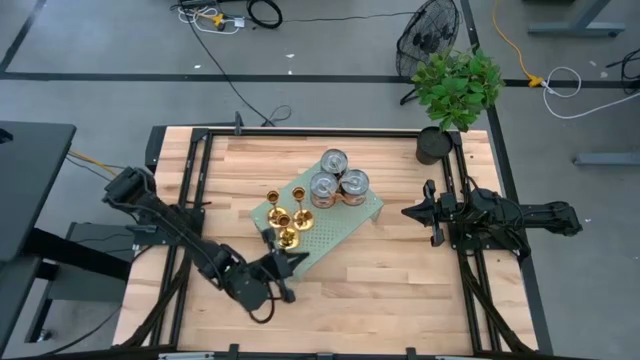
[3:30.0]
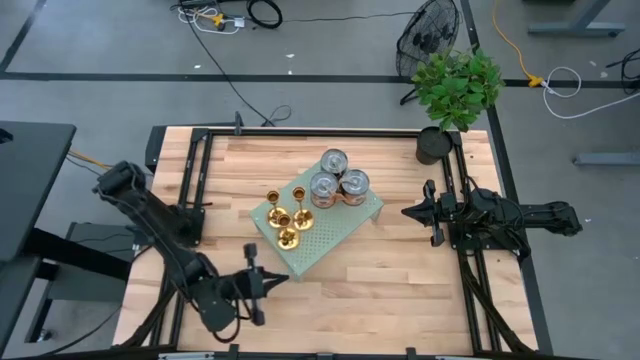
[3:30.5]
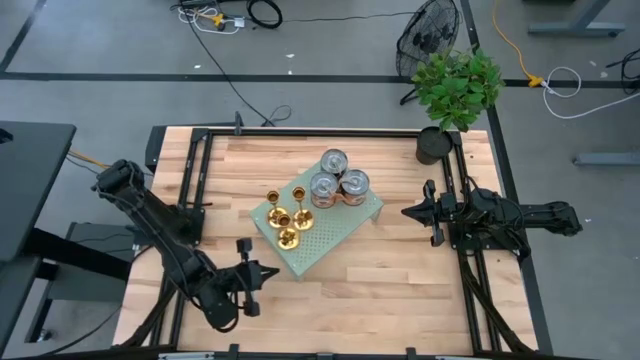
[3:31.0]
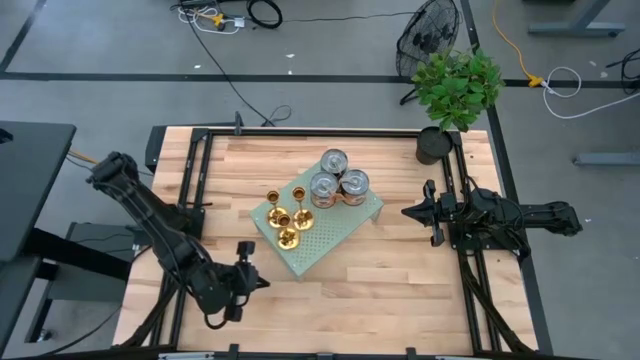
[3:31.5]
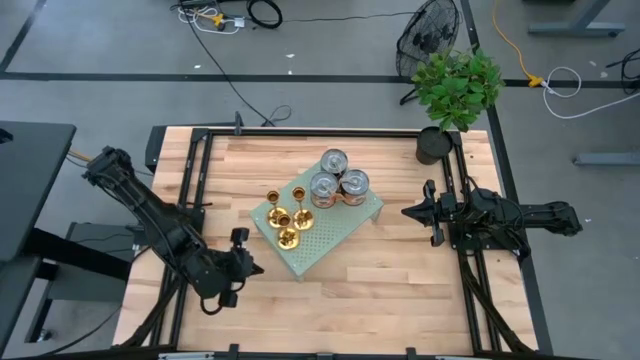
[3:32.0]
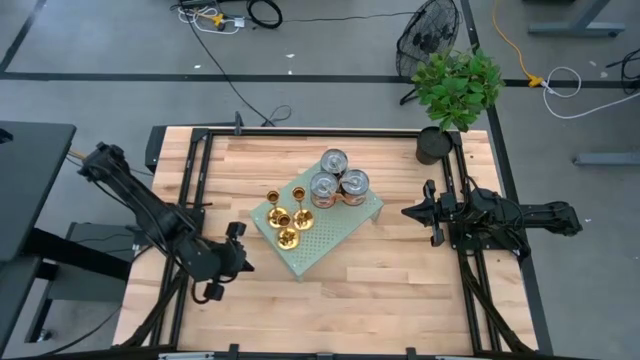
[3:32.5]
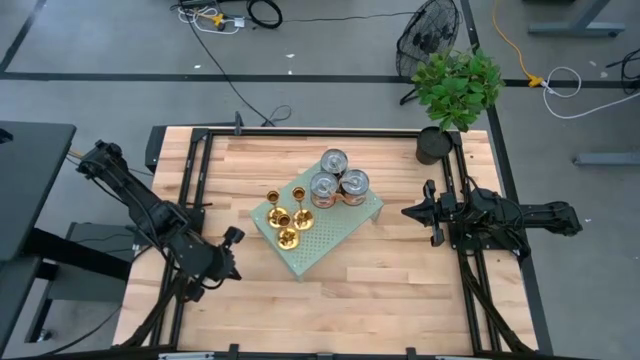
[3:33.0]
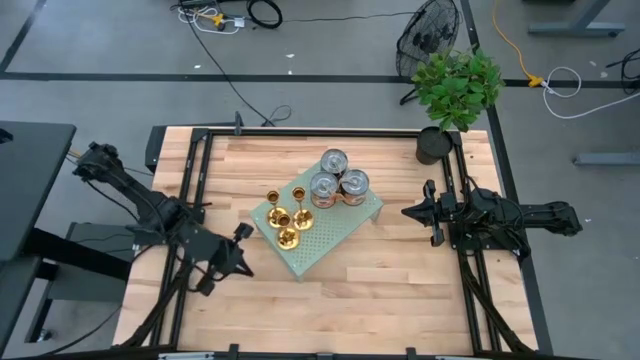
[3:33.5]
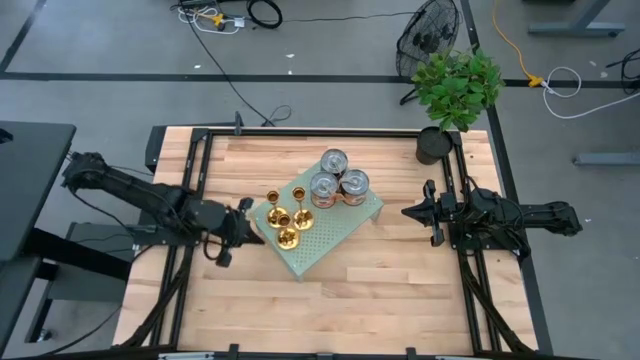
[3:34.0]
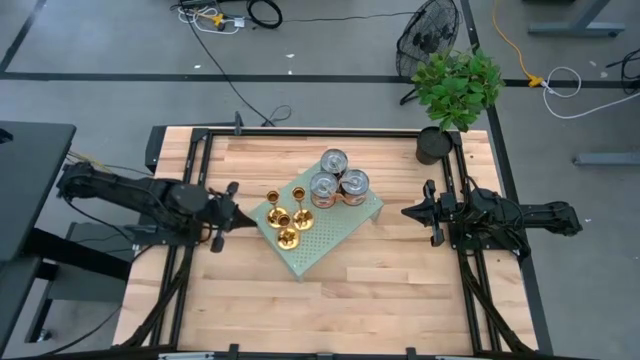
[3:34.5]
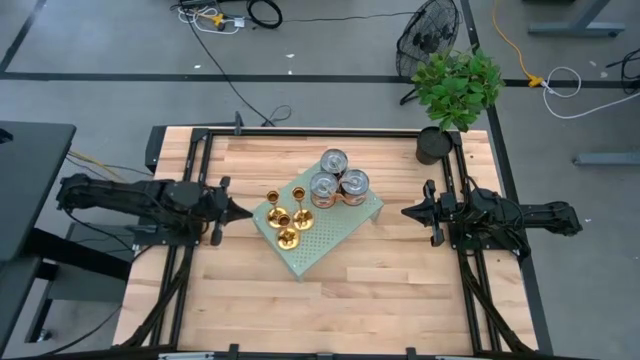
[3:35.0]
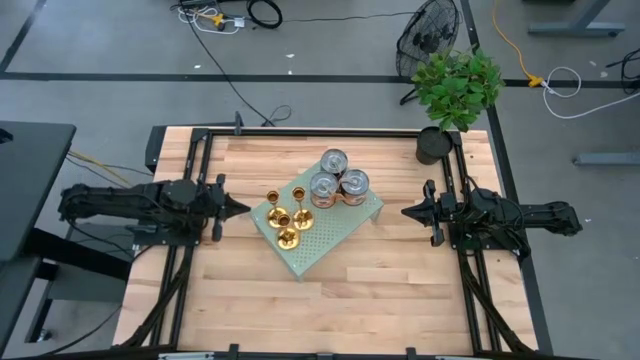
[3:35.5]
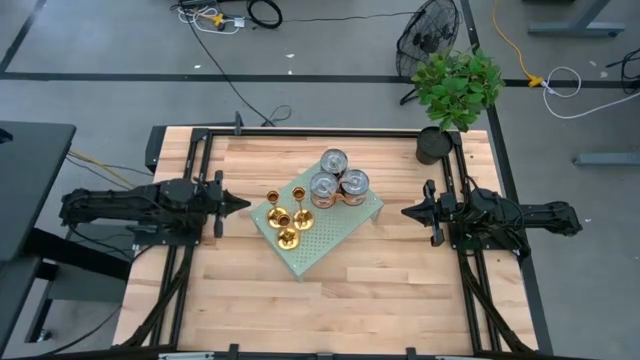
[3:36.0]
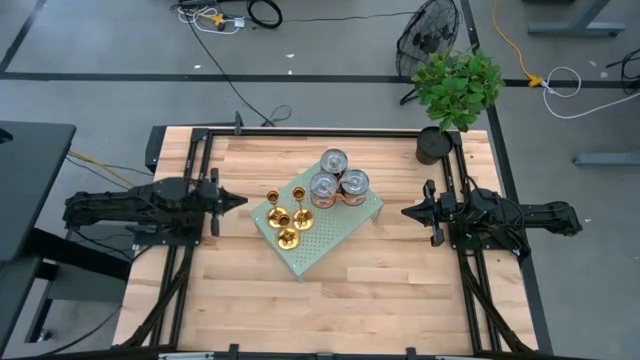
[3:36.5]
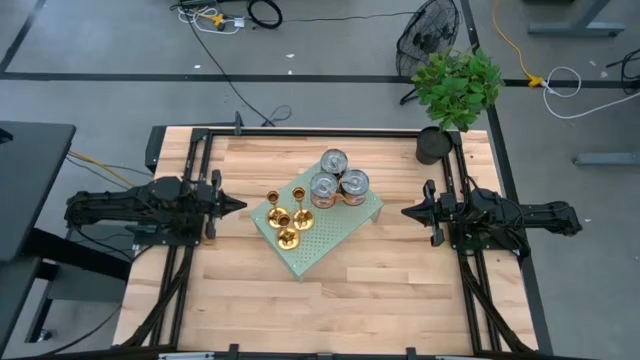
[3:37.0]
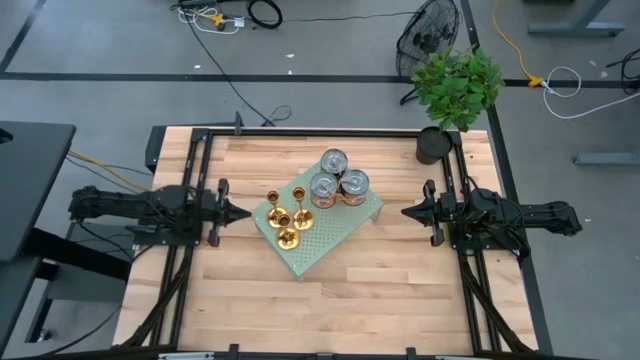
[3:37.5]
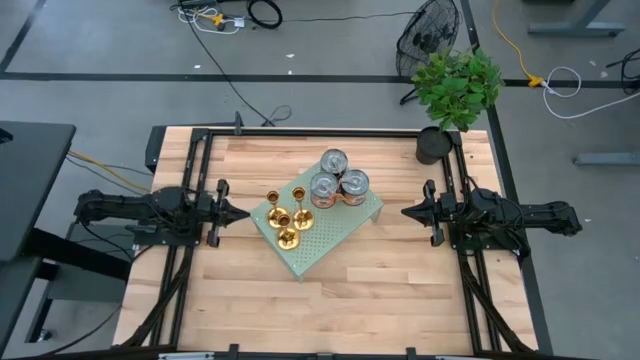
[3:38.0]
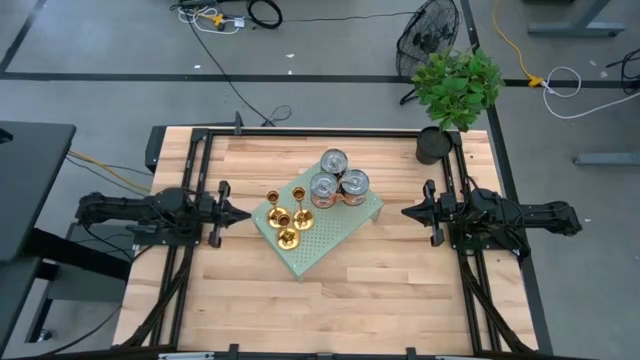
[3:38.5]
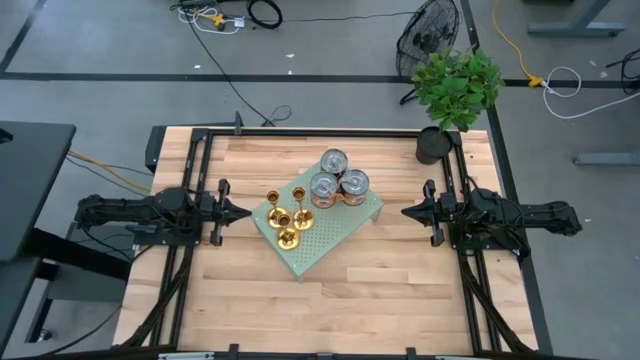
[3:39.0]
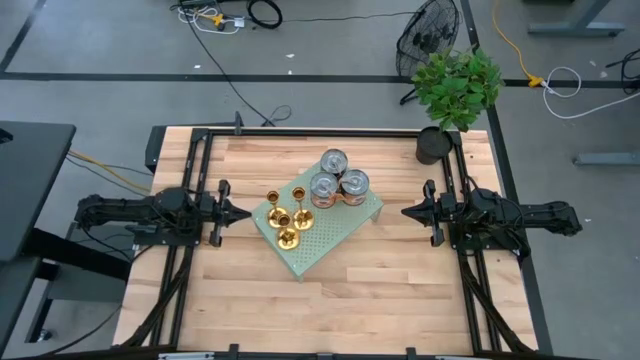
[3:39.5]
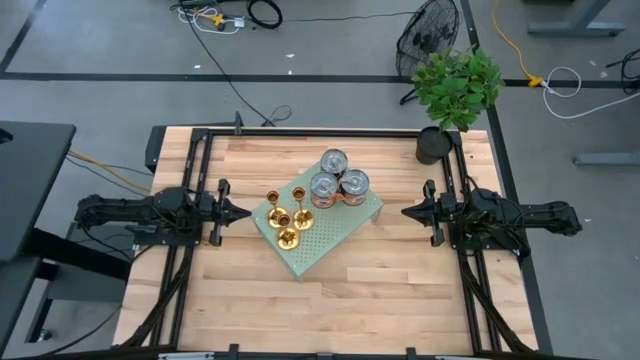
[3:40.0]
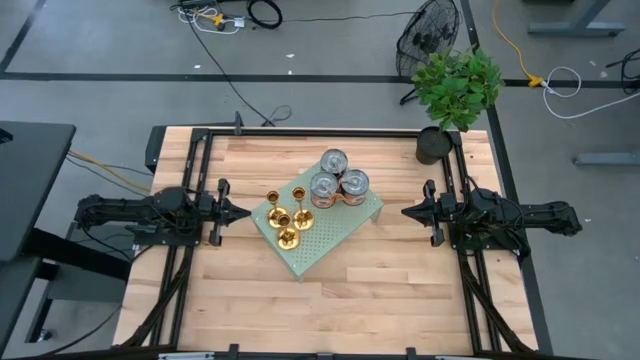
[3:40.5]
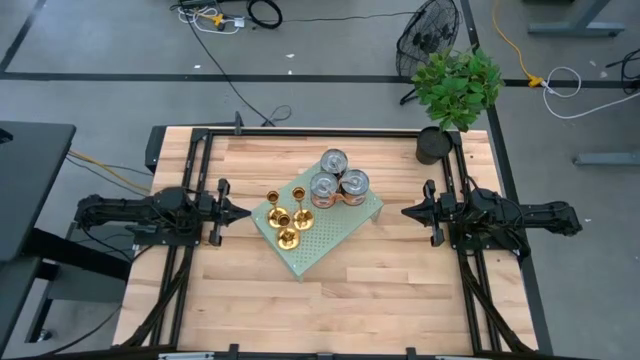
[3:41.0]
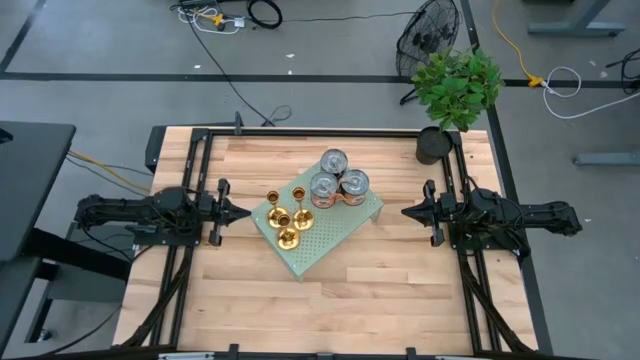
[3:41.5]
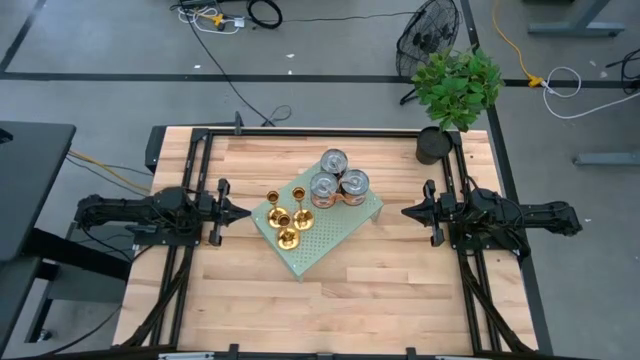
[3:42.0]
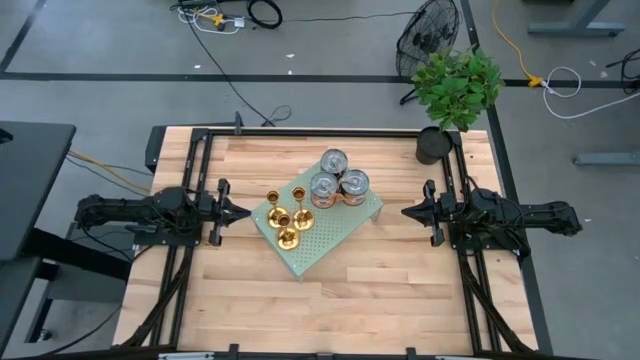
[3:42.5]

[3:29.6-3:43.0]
Task: Pick & Place candle stick holders
Return to Home Position

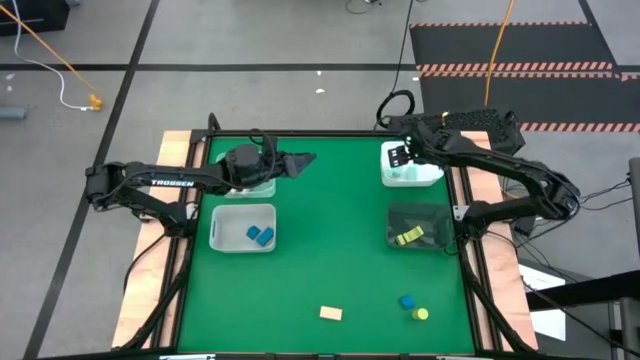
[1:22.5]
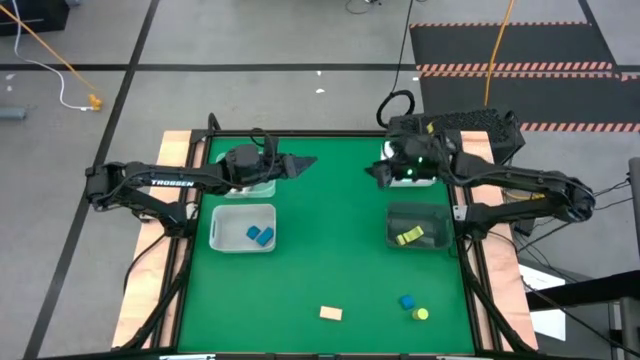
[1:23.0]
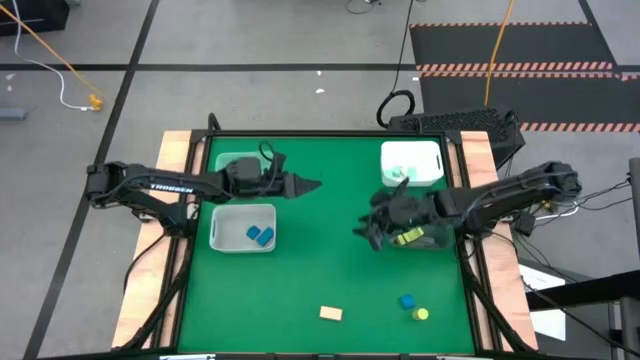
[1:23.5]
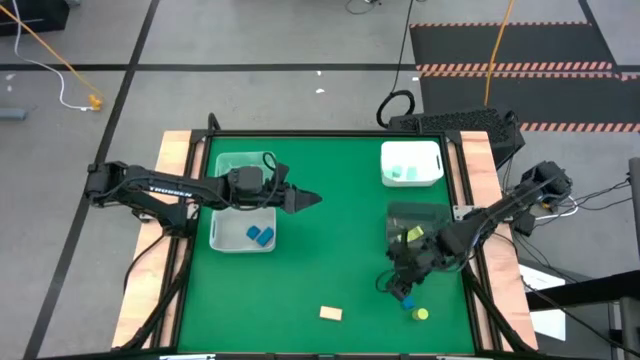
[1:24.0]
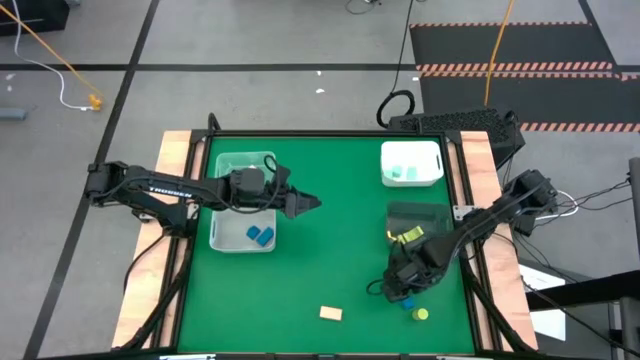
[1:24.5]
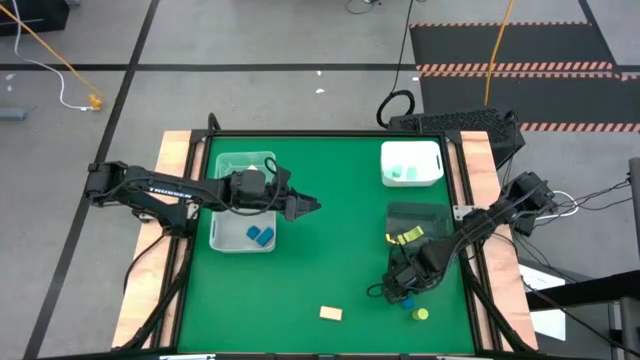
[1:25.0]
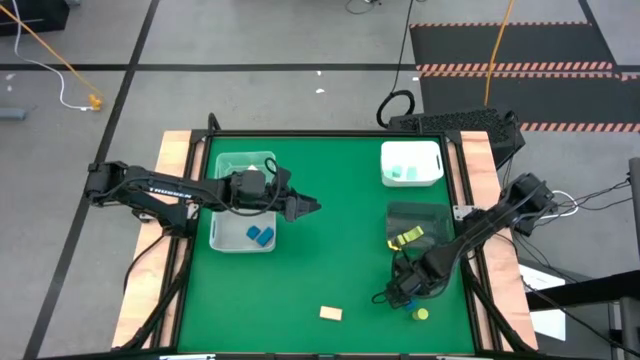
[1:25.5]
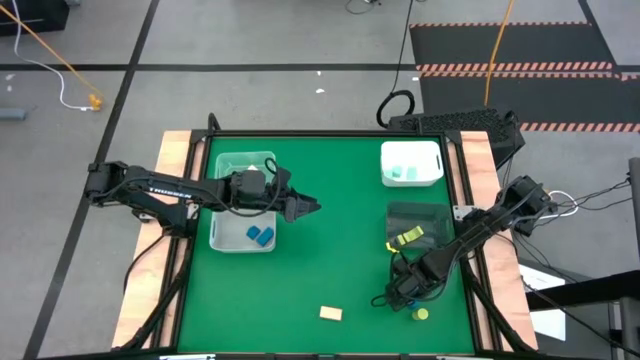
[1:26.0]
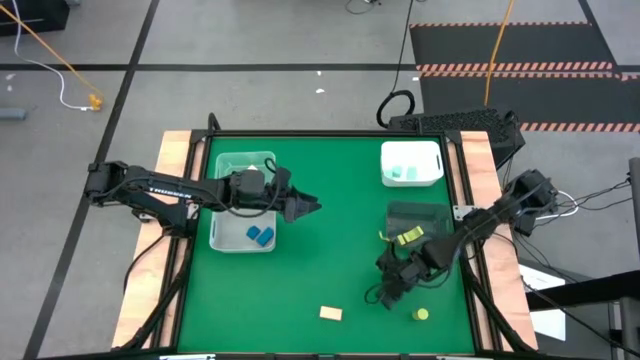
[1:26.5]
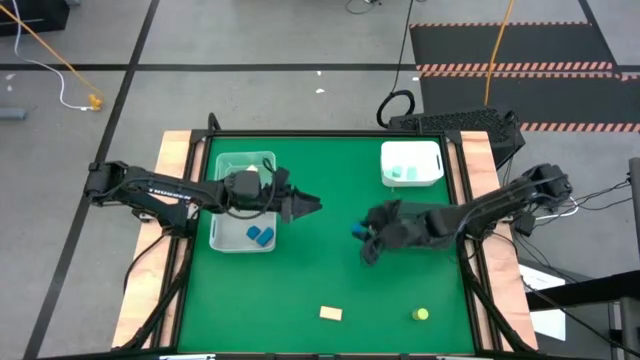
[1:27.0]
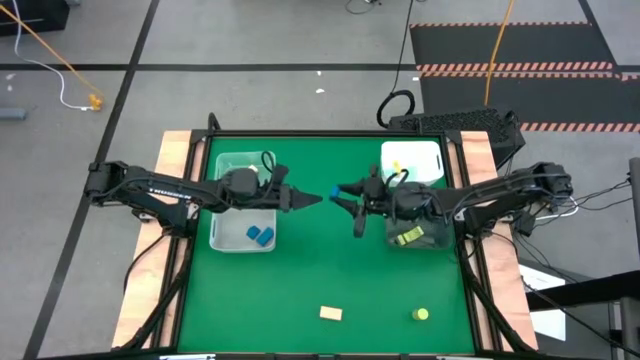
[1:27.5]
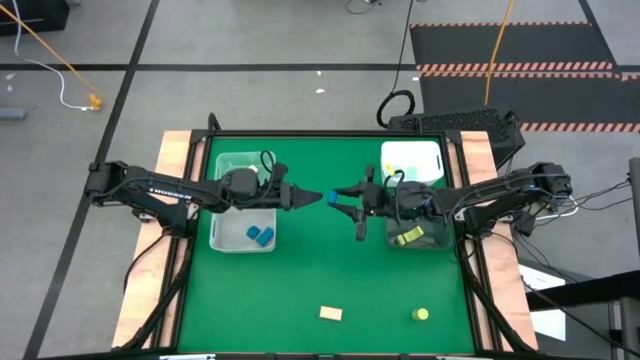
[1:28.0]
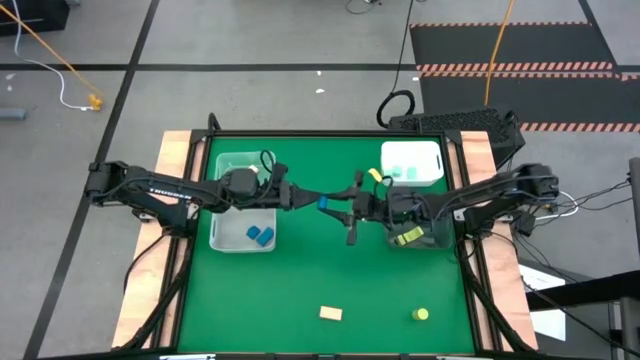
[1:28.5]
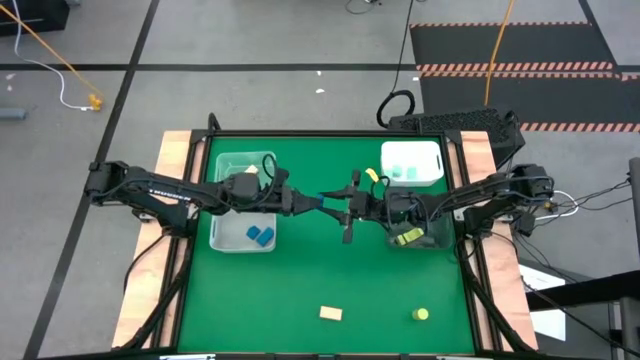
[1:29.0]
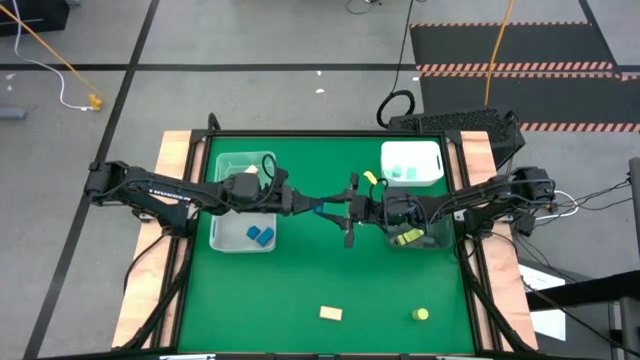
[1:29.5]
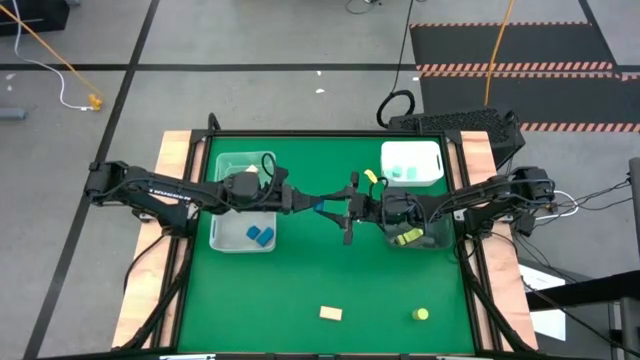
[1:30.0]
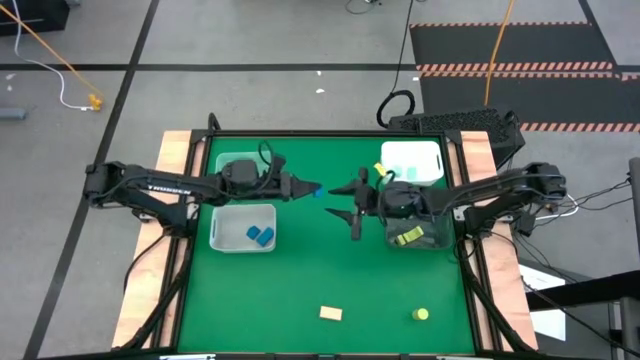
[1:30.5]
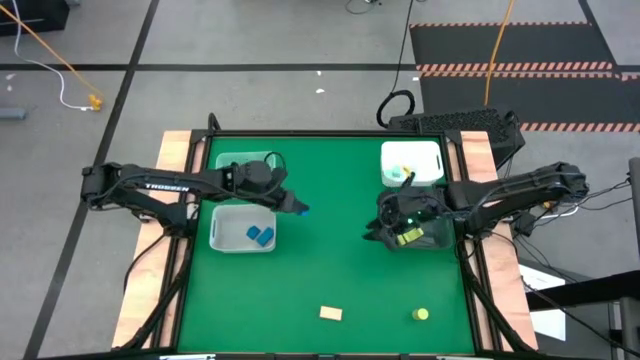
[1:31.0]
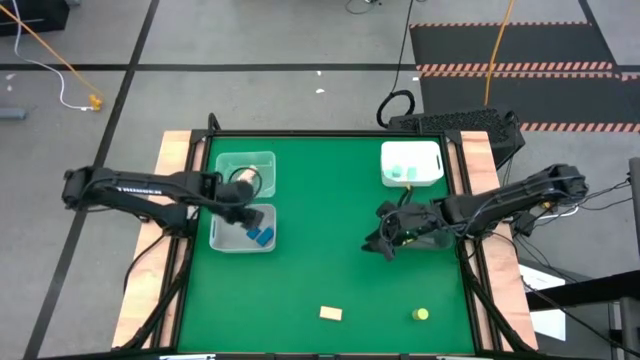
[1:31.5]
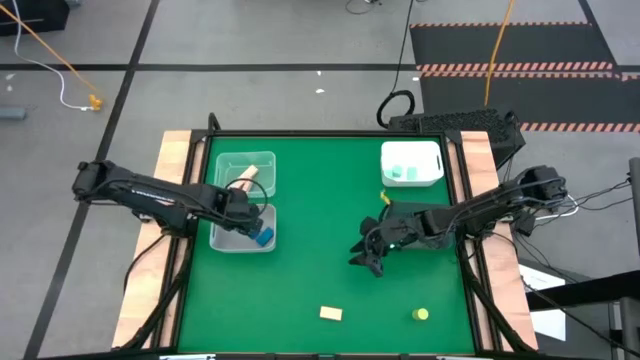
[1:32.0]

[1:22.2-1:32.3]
Task: Sort & place blocks by color
Put the blue block into the gray bin
